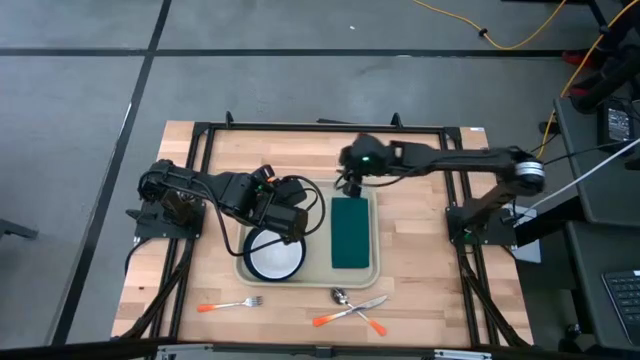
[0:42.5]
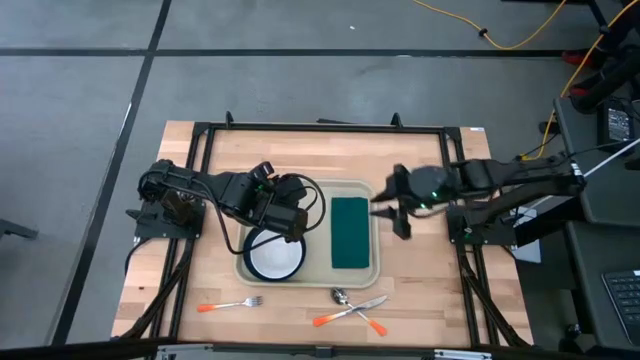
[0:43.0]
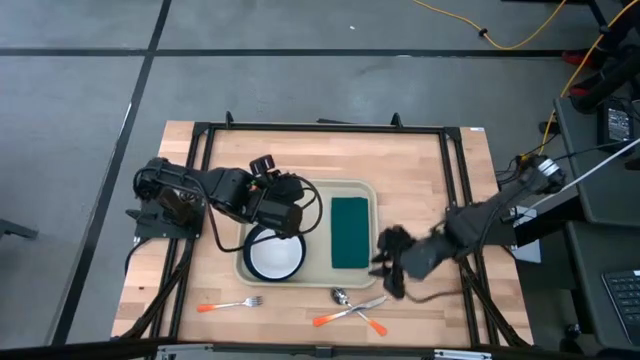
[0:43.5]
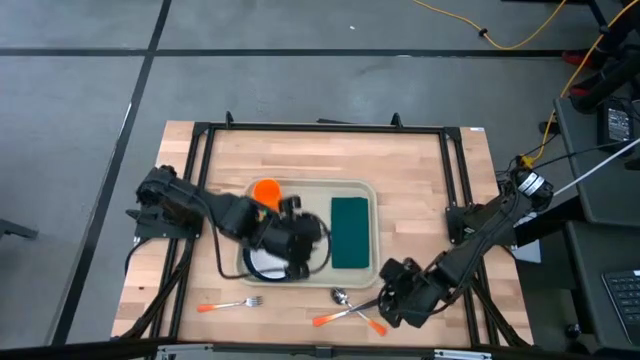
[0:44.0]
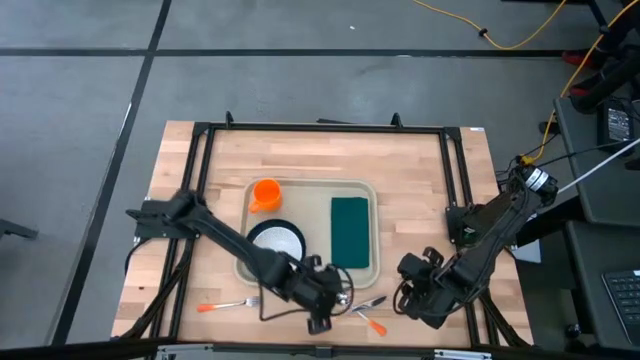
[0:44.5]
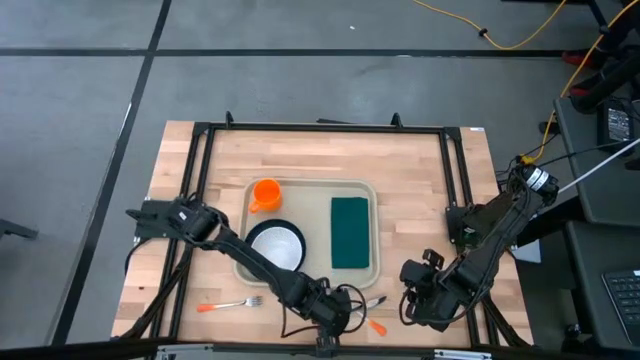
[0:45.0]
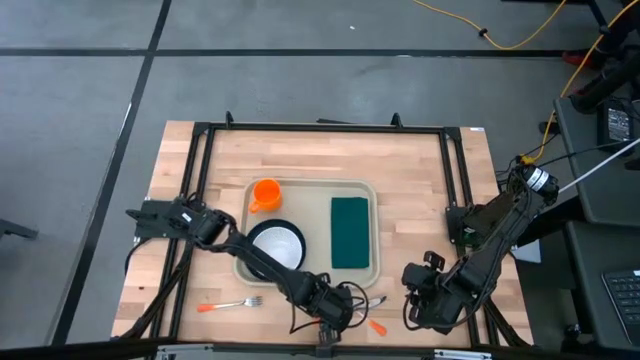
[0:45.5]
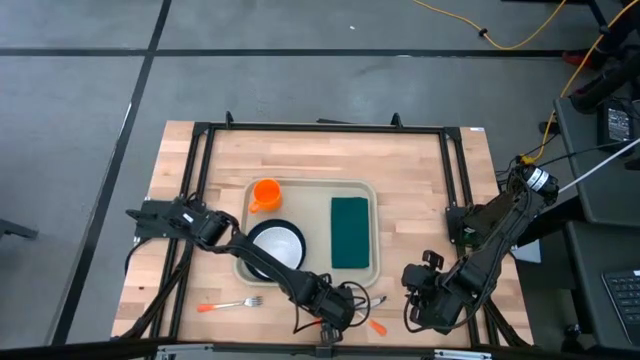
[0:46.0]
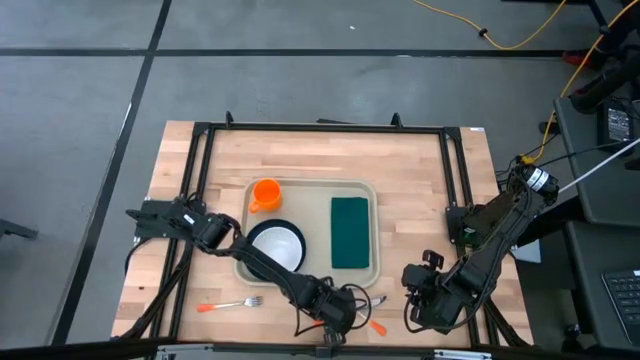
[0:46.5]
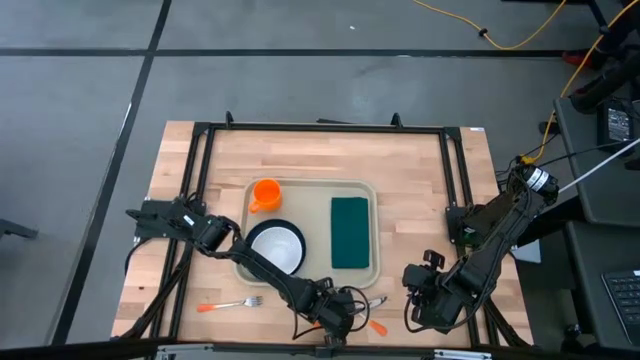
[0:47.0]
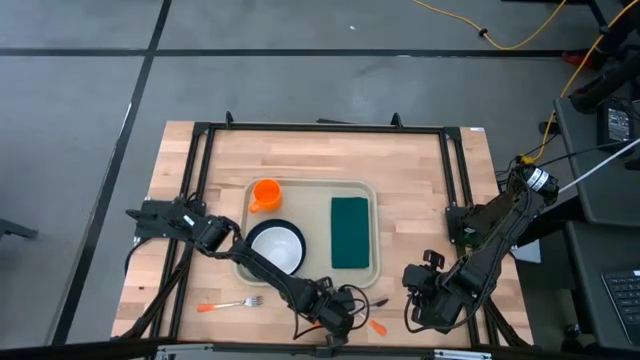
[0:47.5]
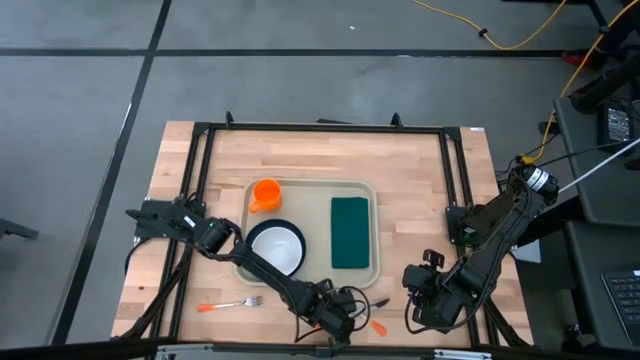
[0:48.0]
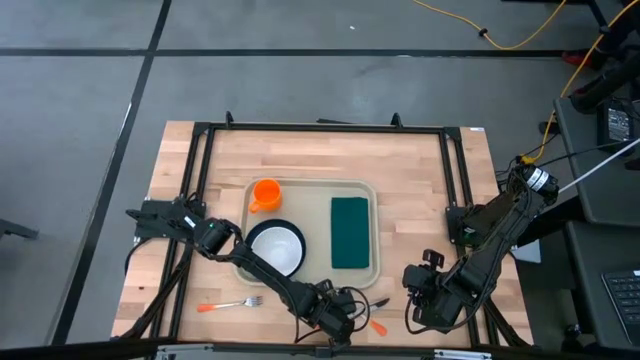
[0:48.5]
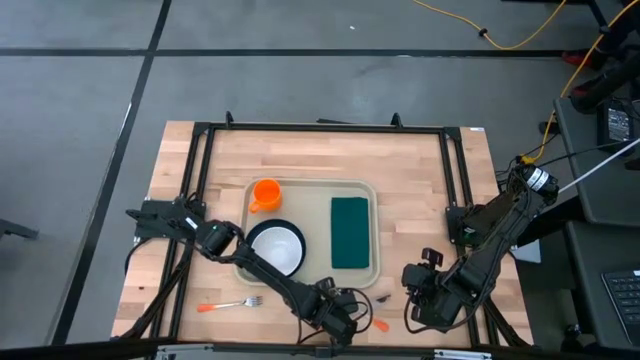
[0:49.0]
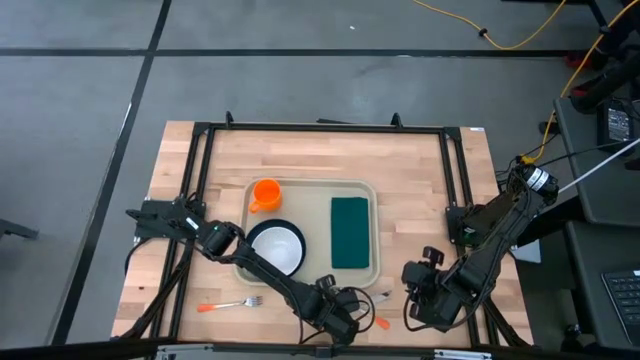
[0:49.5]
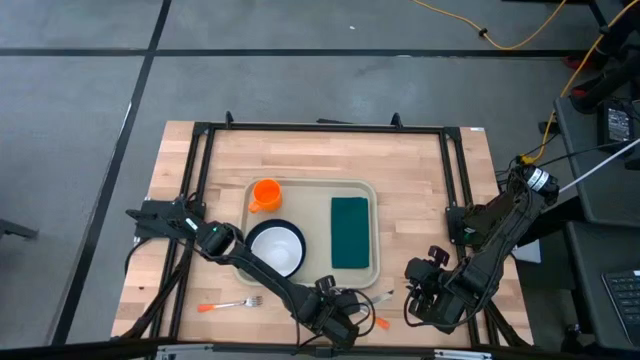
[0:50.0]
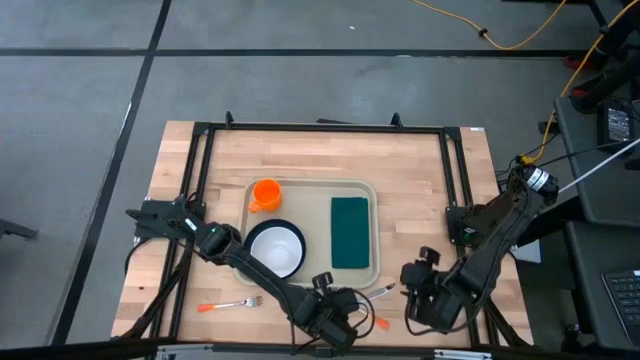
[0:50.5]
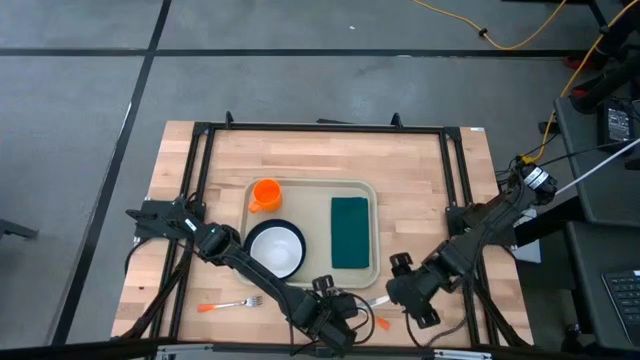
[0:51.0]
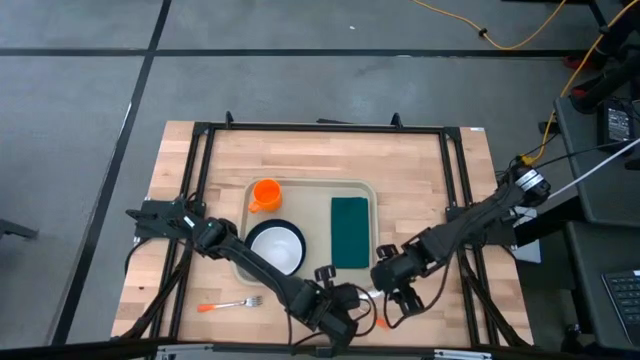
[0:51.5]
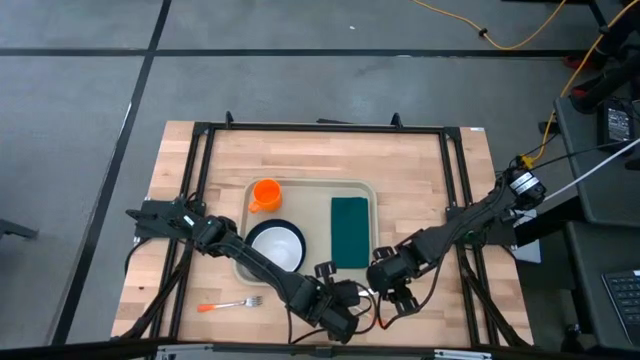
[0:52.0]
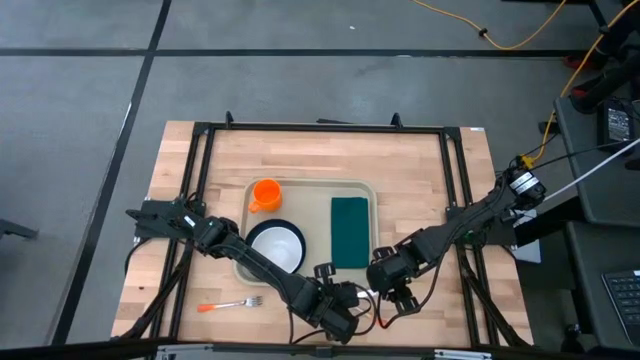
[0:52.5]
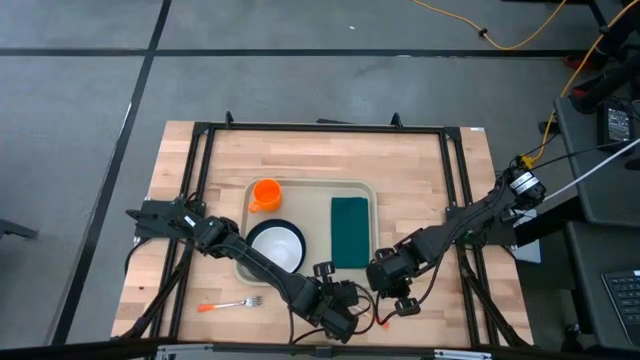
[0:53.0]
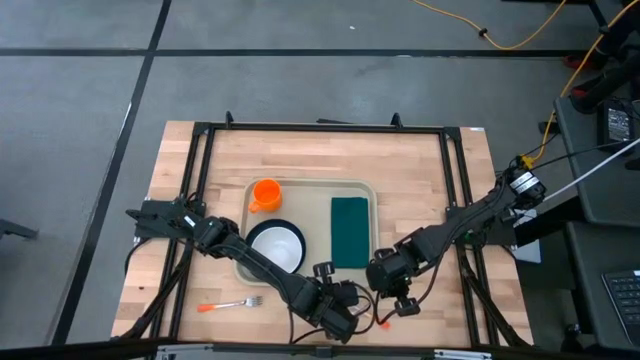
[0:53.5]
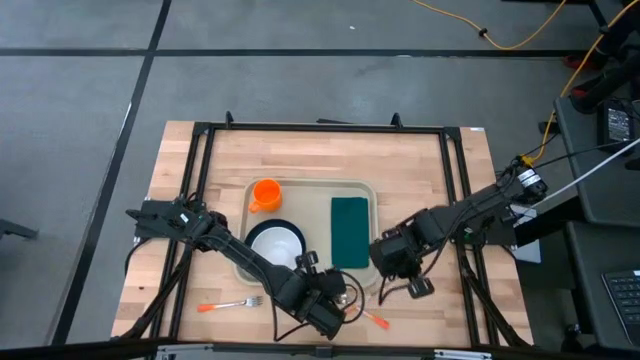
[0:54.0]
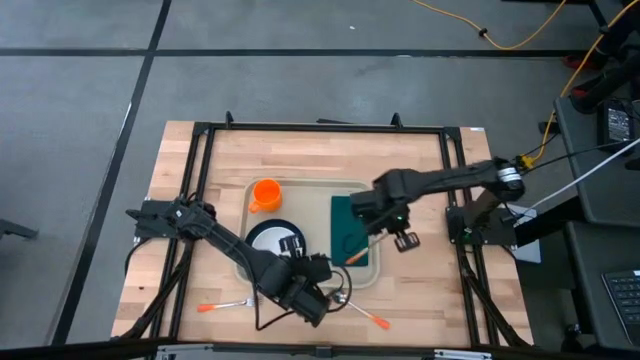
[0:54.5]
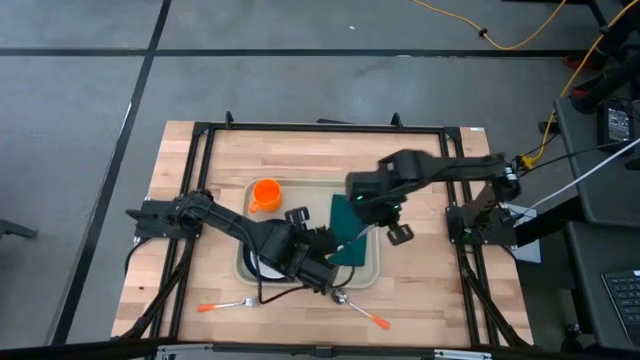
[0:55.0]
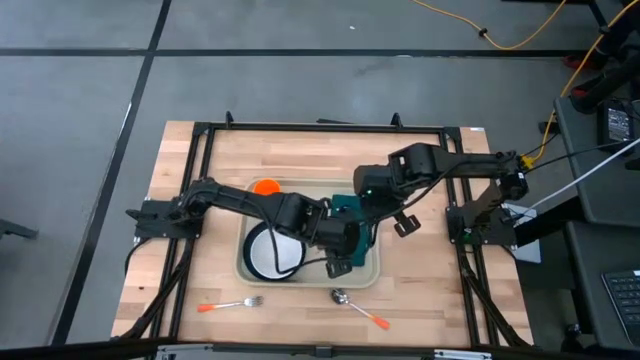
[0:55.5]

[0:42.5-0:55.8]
Task: Set up tray
Put the orange knife on the dark green napkin

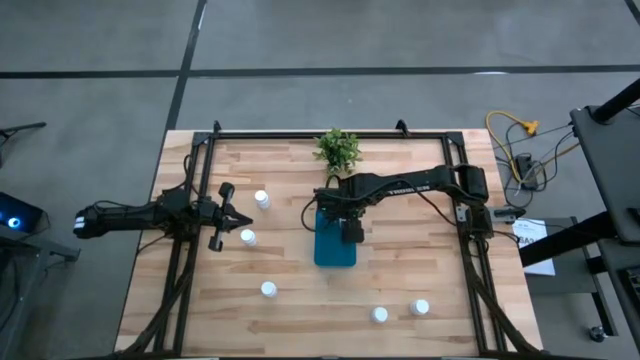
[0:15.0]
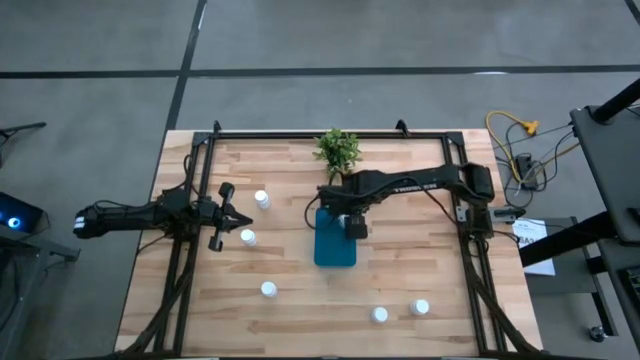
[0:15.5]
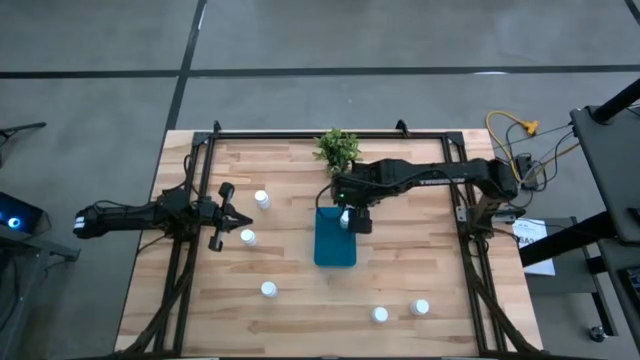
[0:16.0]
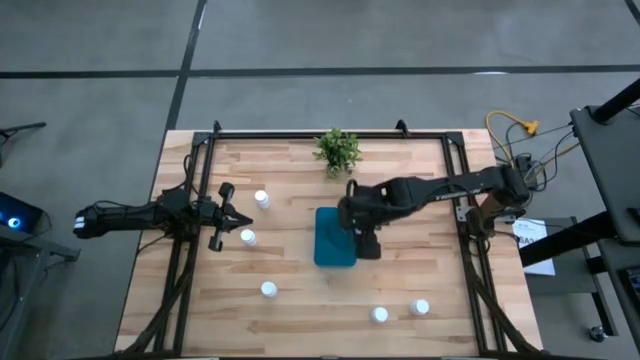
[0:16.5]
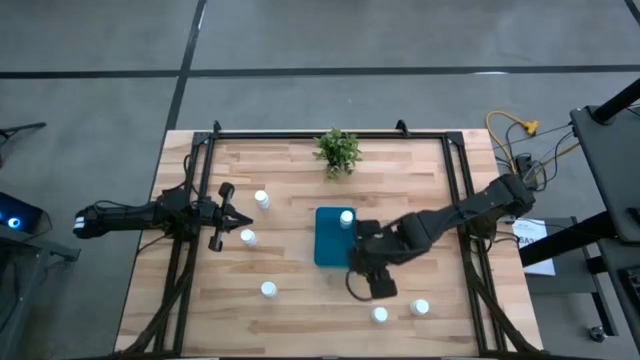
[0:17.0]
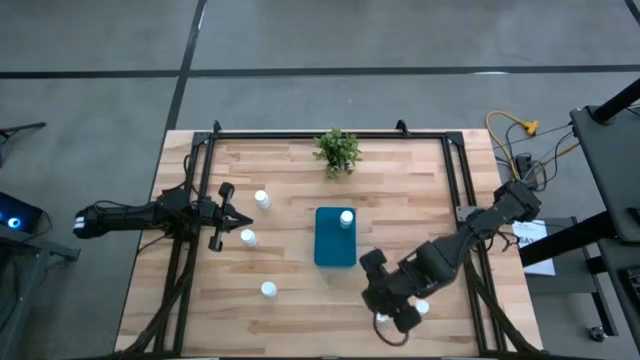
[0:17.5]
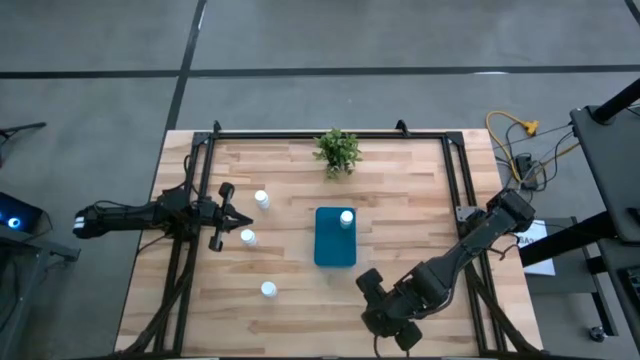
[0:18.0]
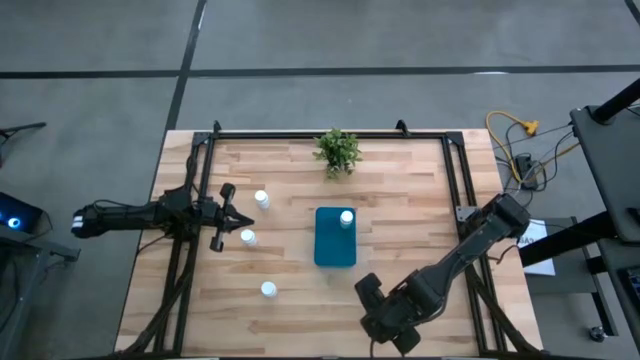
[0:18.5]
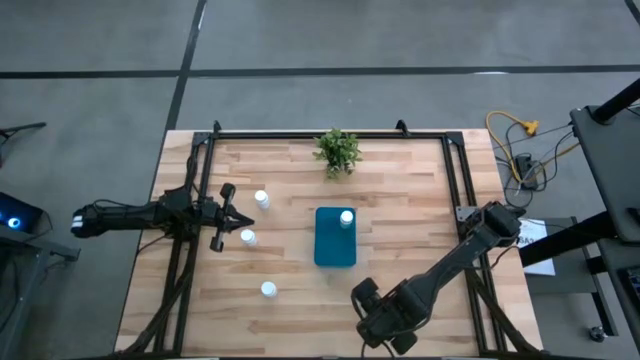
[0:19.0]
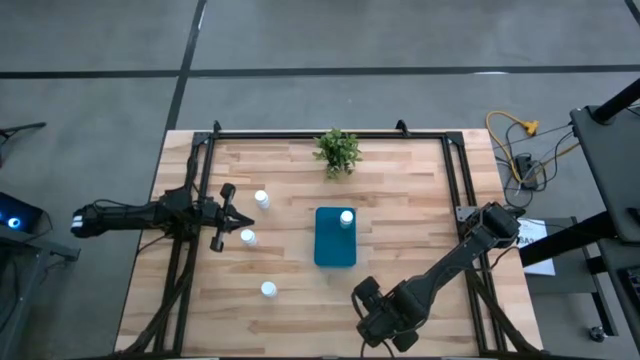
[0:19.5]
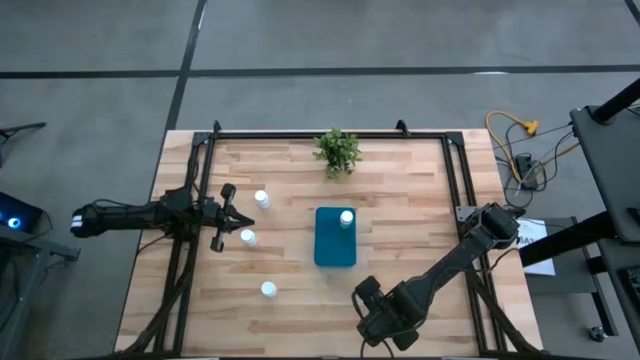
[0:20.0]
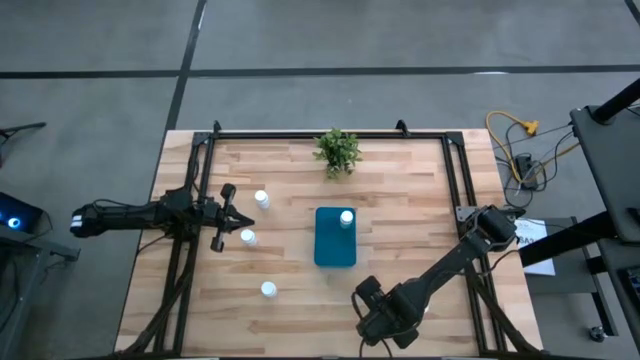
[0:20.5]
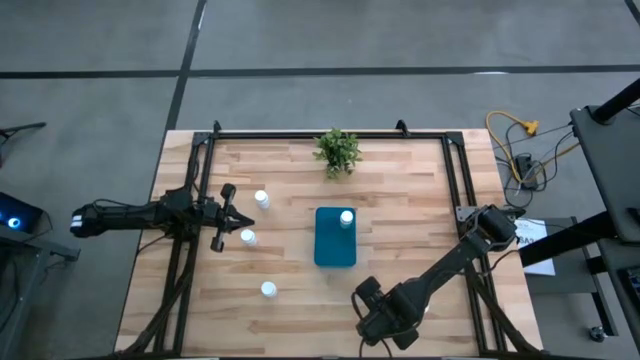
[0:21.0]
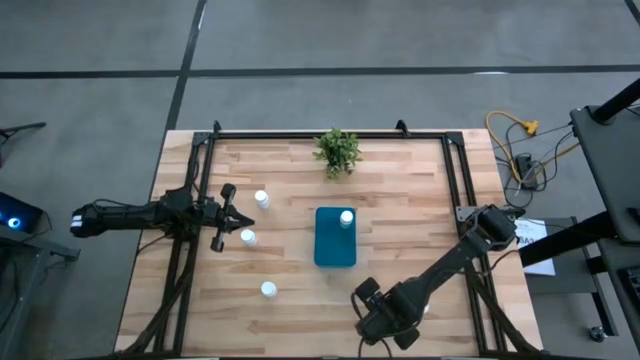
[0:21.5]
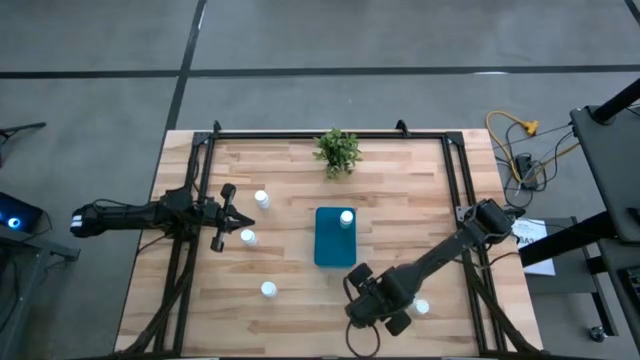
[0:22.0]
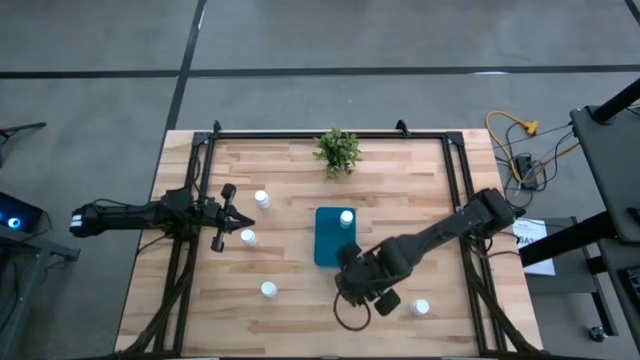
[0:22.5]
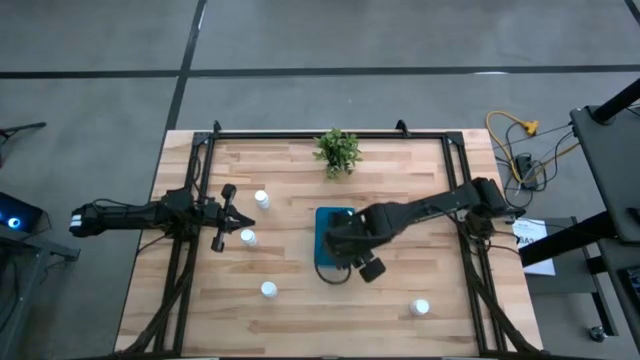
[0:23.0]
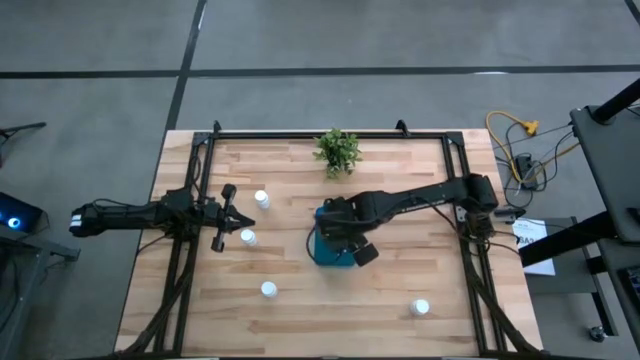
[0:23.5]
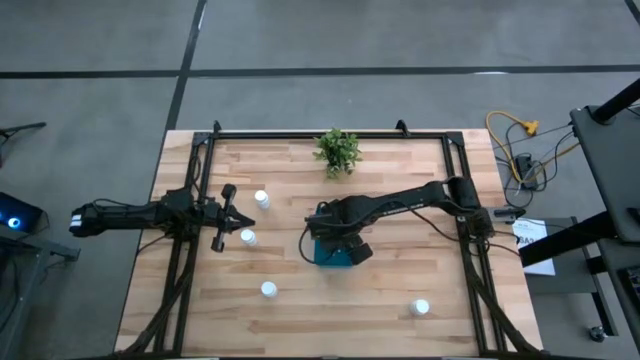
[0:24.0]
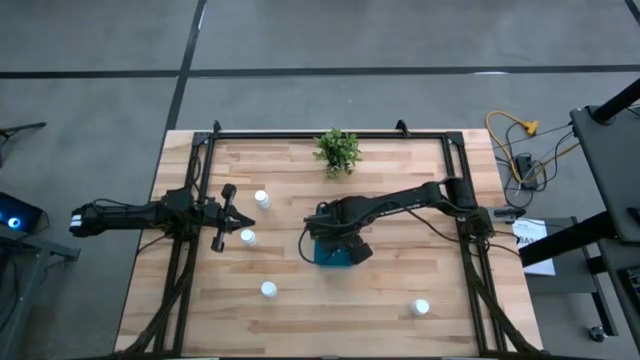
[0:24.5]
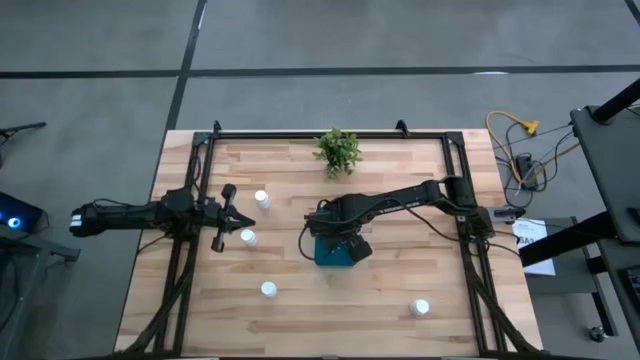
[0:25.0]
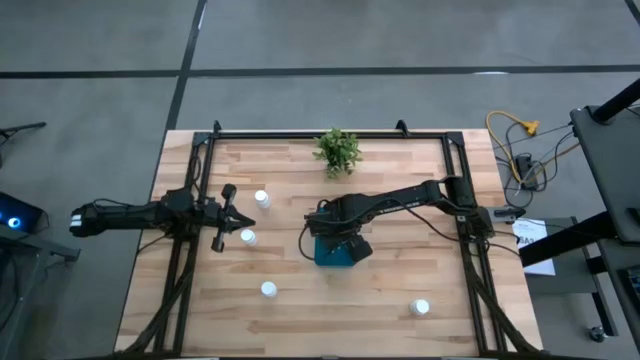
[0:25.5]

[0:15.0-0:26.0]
Task: Pick and place pill bottles into a basket
Put the white medicine bottle into the blue bin
